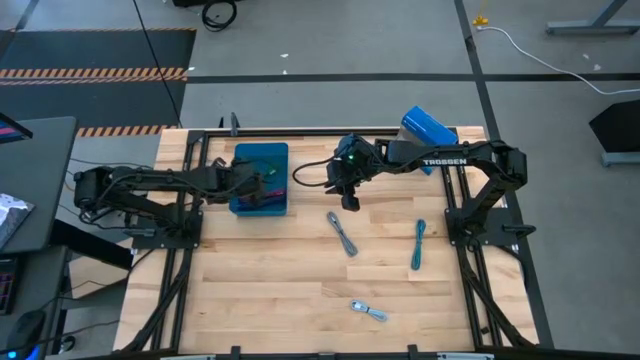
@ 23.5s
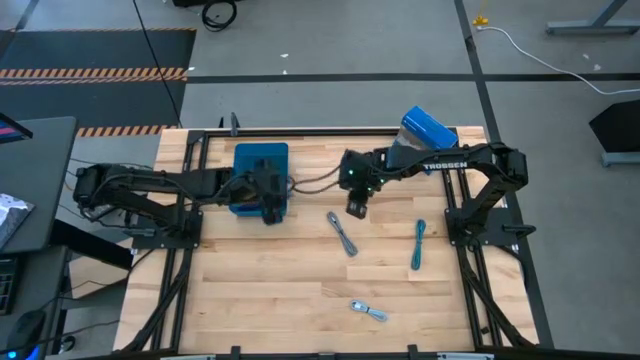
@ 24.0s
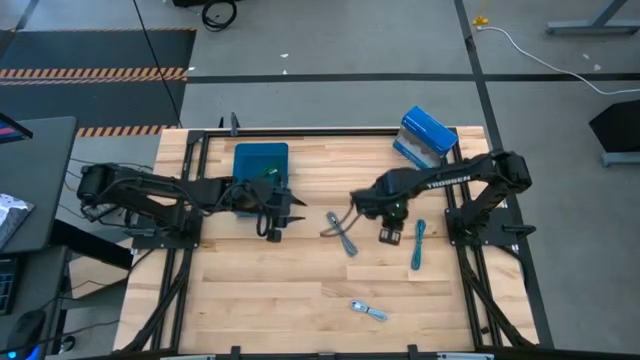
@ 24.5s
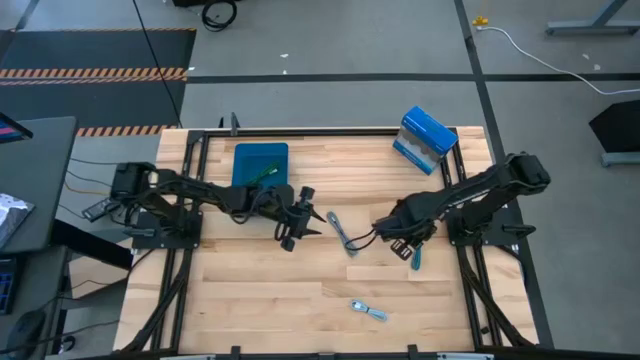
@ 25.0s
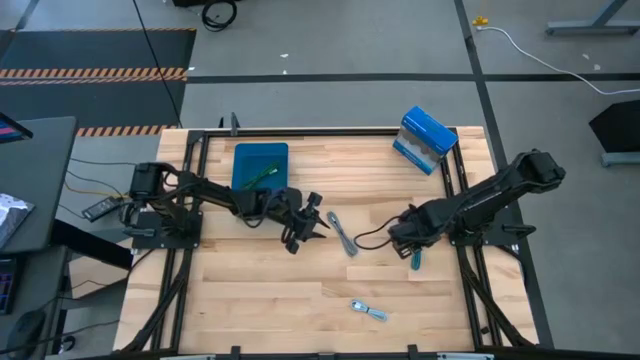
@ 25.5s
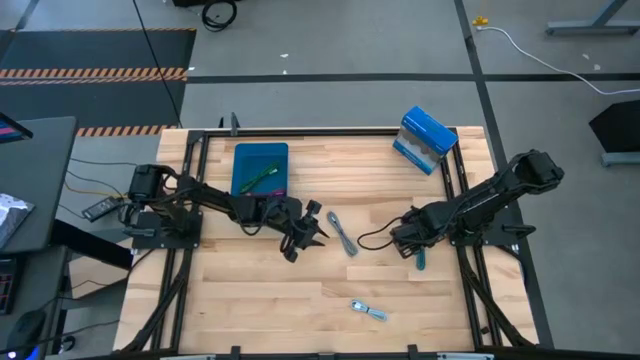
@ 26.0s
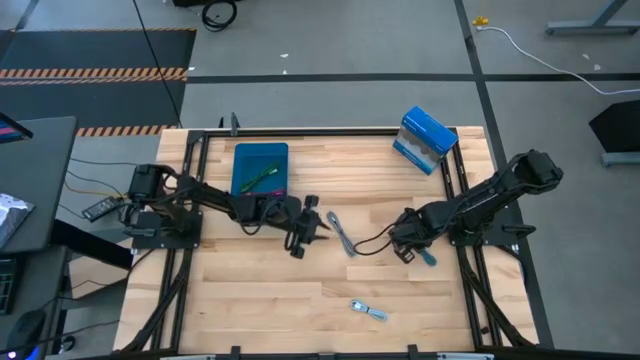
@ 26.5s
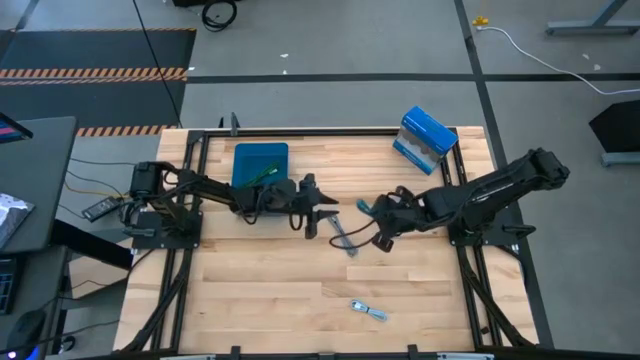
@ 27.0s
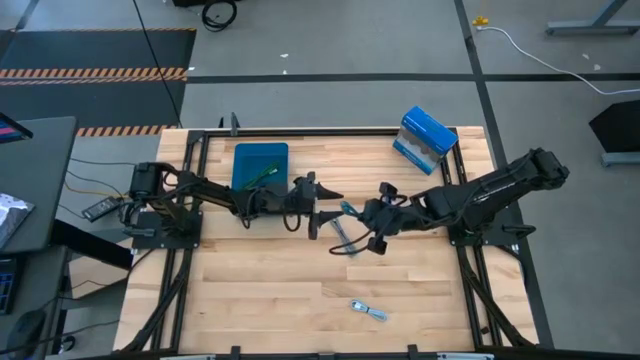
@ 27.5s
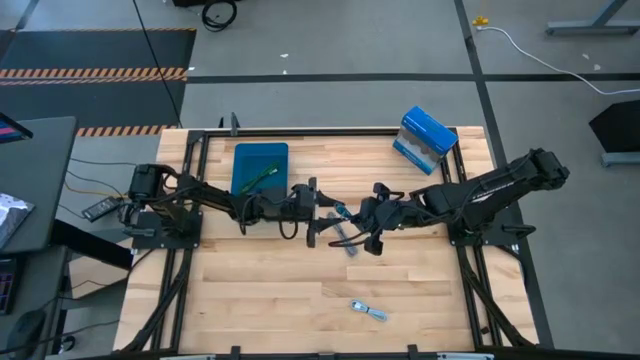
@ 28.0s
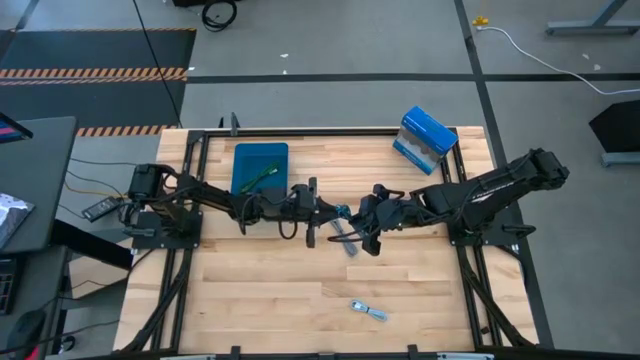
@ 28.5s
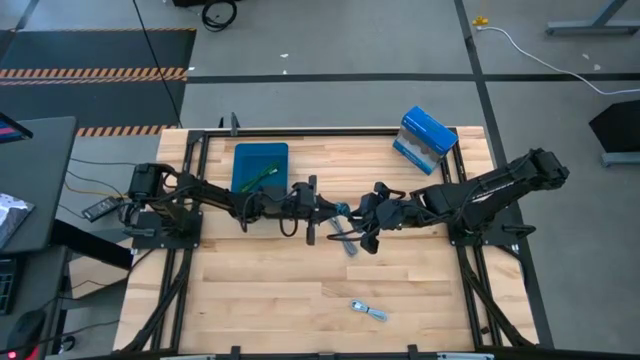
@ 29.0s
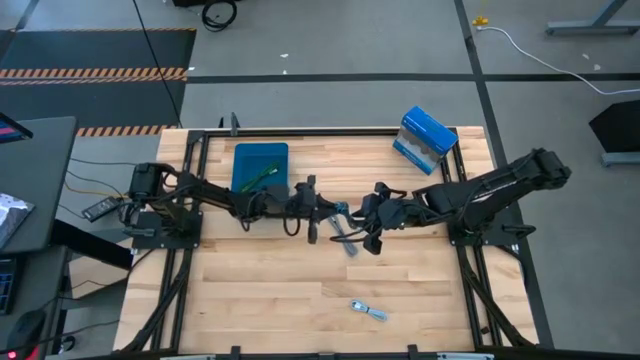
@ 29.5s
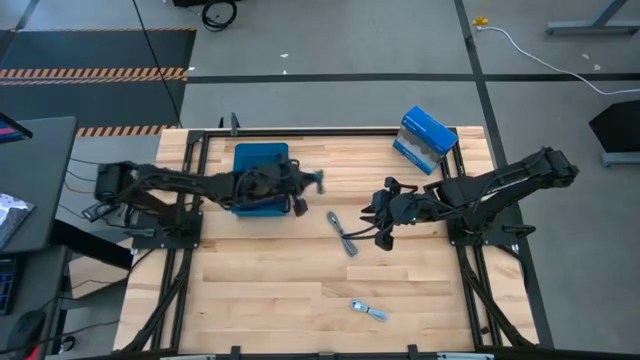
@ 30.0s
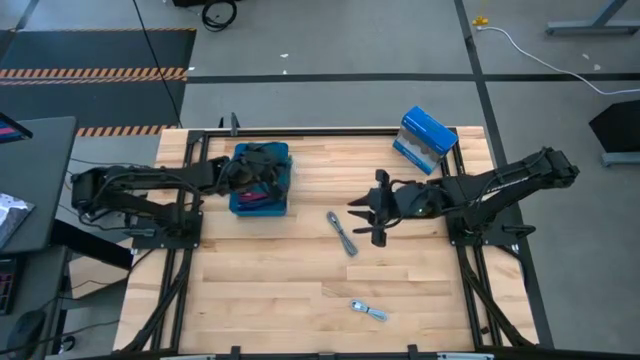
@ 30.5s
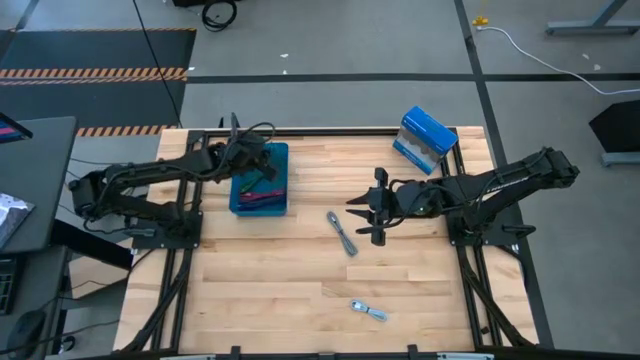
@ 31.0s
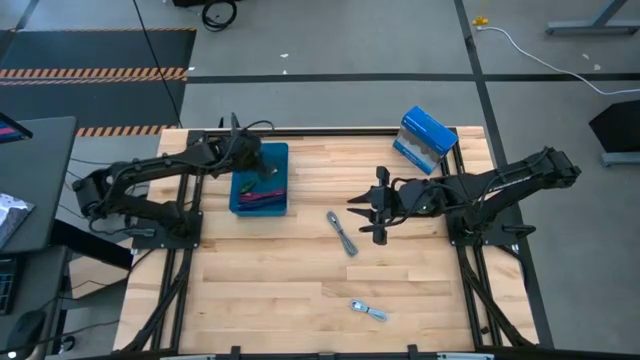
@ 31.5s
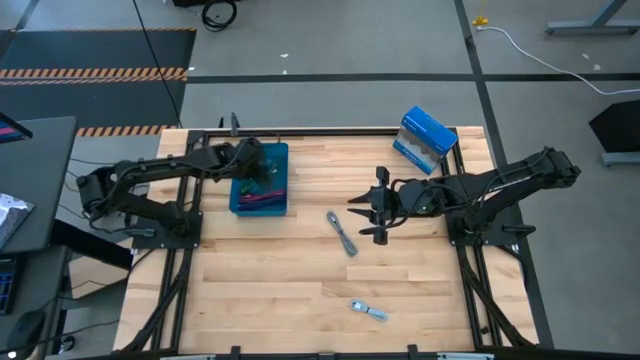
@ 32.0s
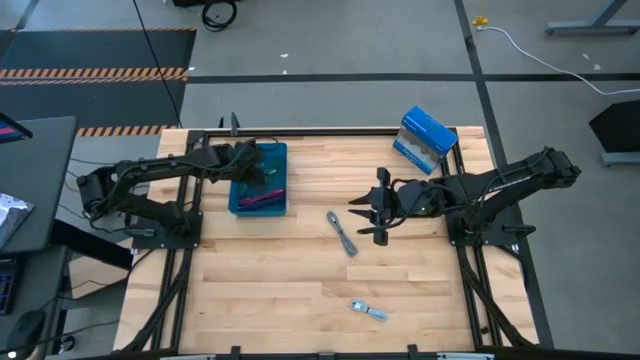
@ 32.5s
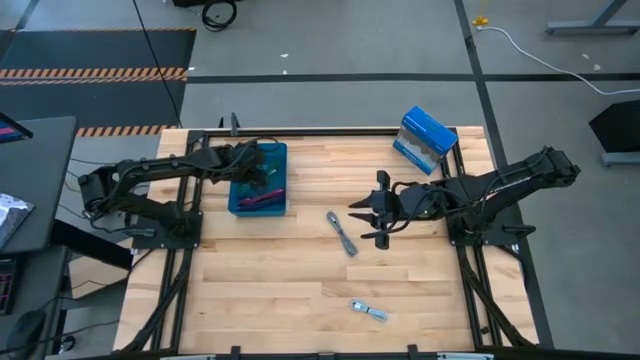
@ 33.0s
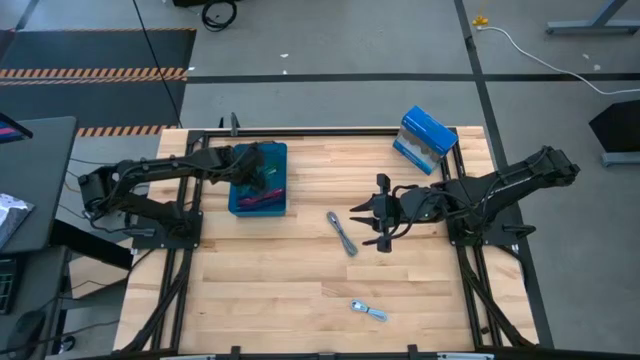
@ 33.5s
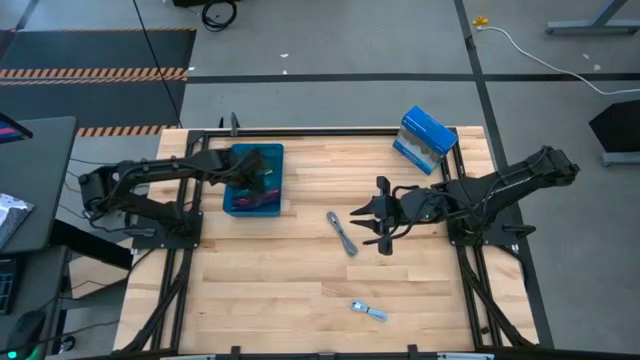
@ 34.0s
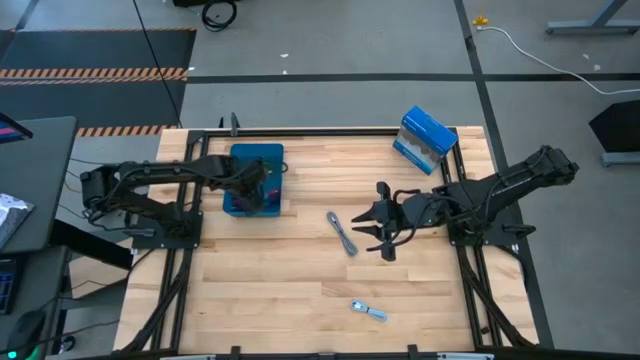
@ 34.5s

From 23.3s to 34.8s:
Task: Pick and place USB-C Cables
Put the black blue charger cable into the blue bin

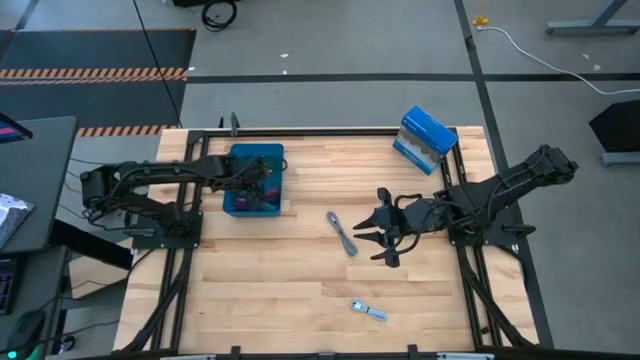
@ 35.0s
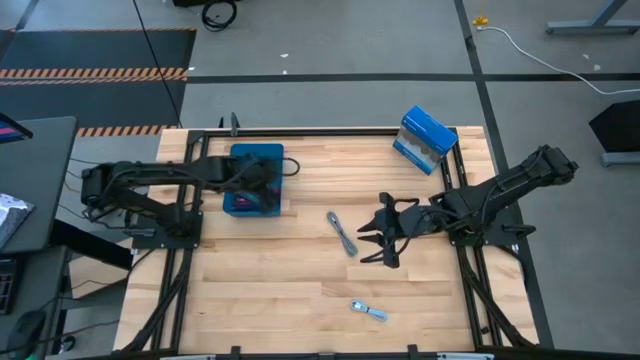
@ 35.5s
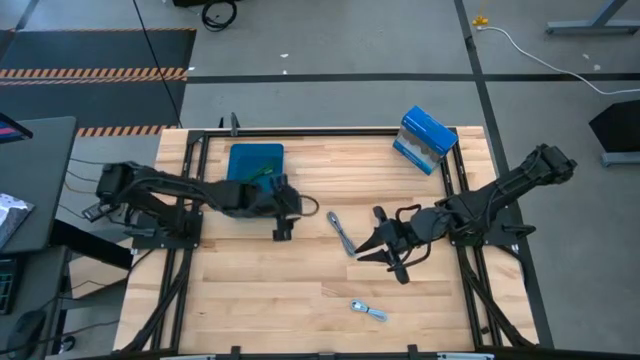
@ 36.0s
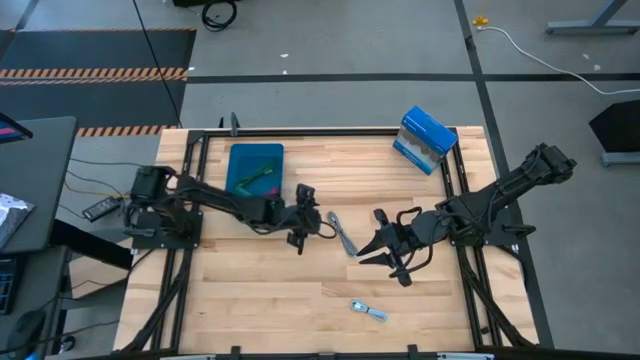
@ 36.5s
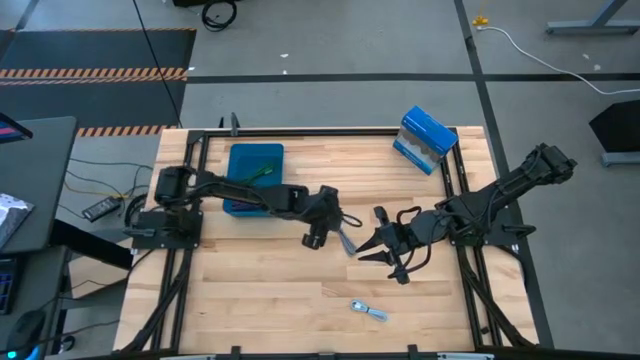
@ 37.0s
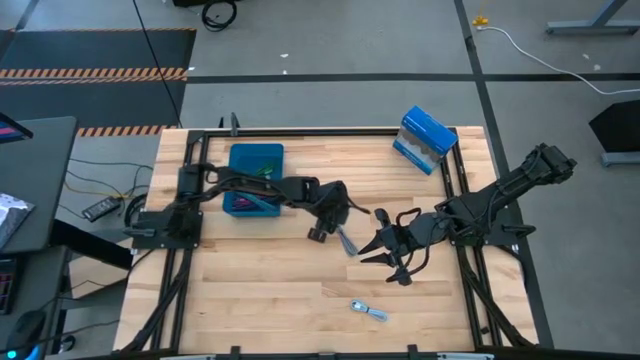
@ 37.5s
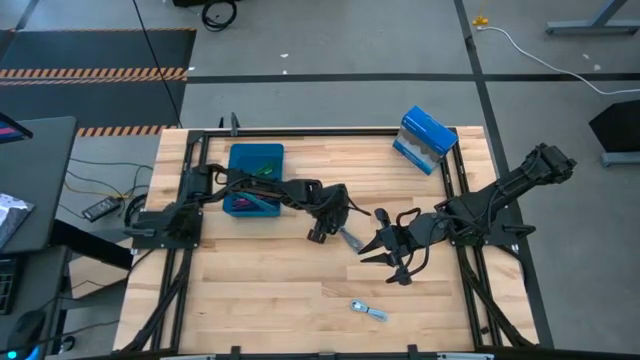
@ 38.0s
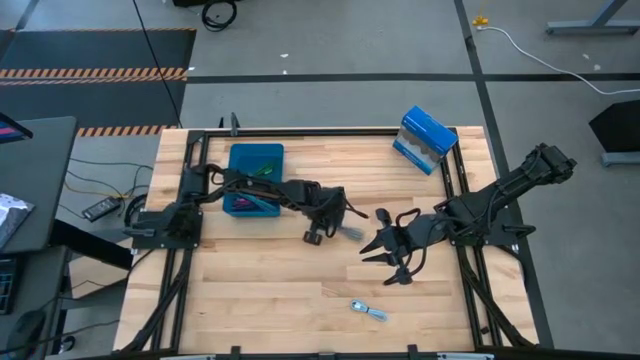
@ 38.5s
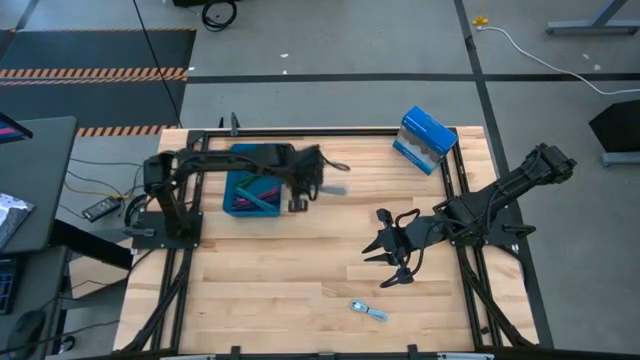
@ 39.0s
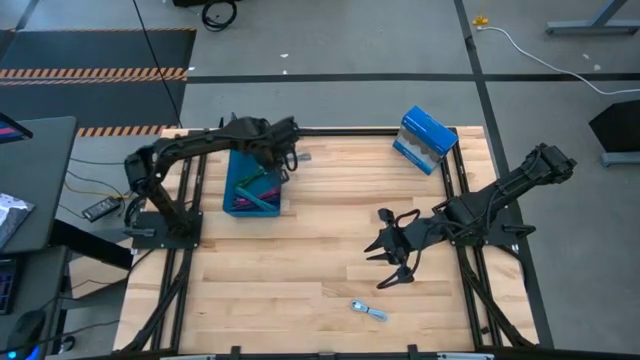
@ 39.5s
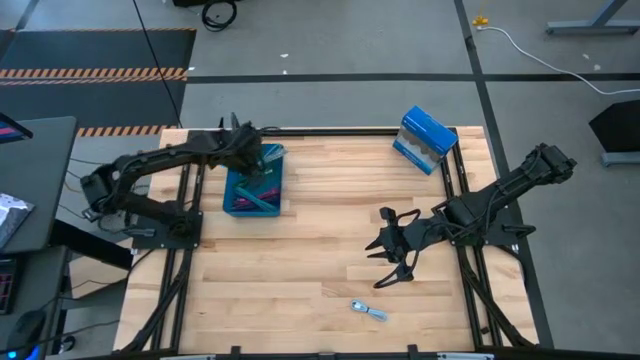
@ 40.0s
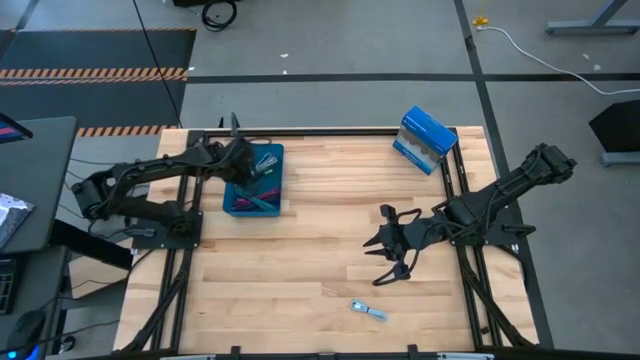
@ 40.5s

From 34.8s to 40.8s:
Put the black white charger cable into the blue bin

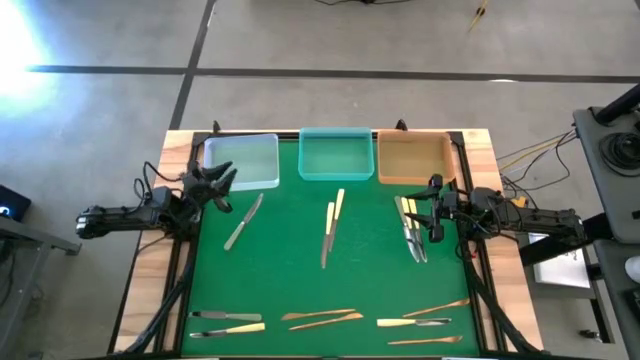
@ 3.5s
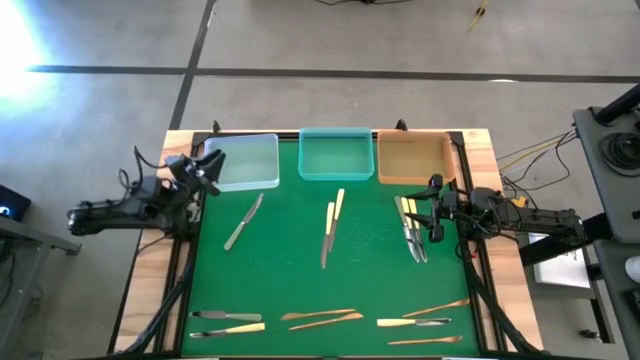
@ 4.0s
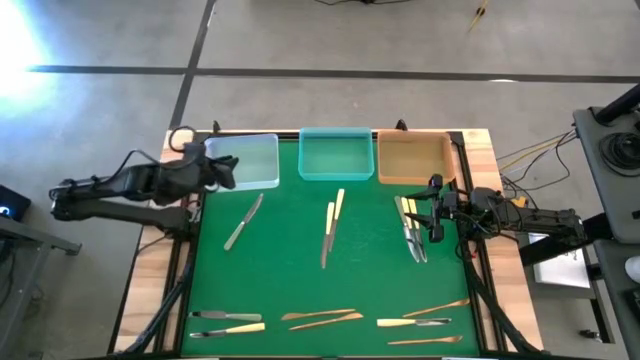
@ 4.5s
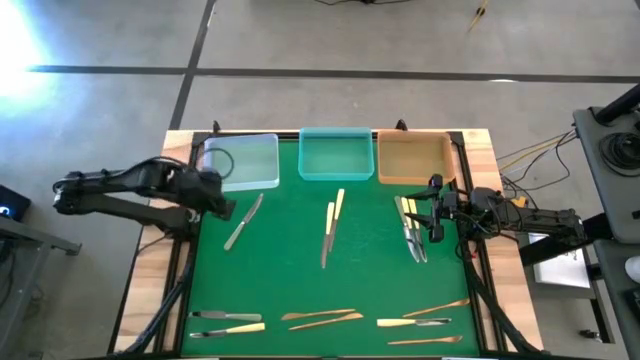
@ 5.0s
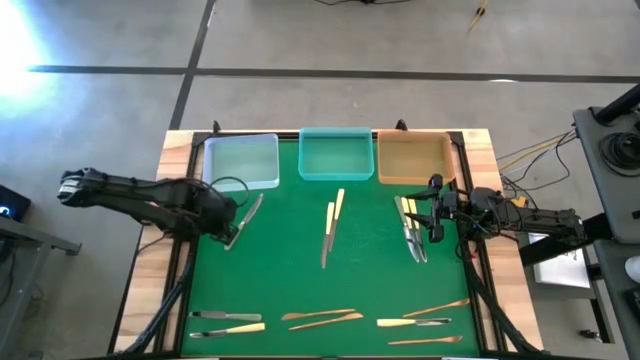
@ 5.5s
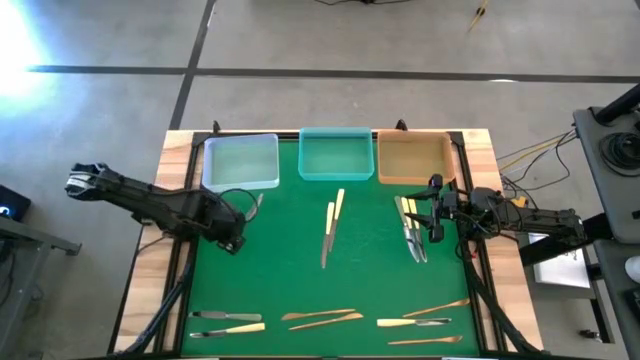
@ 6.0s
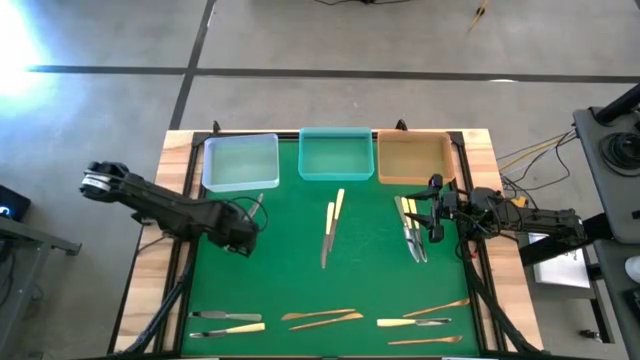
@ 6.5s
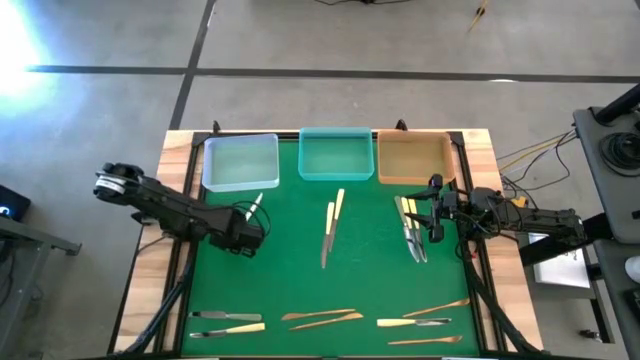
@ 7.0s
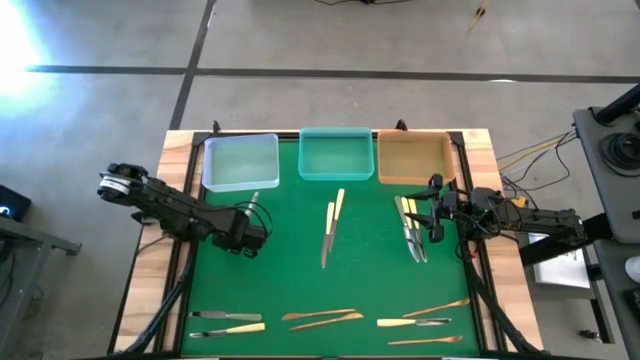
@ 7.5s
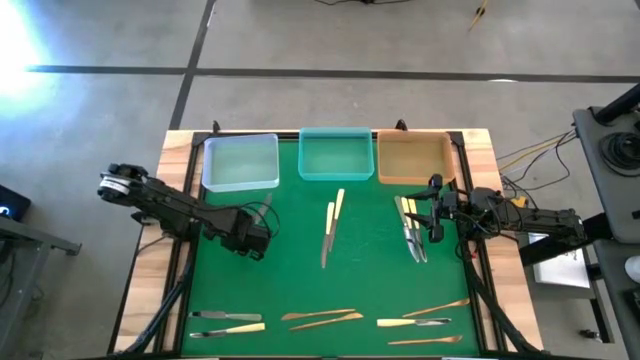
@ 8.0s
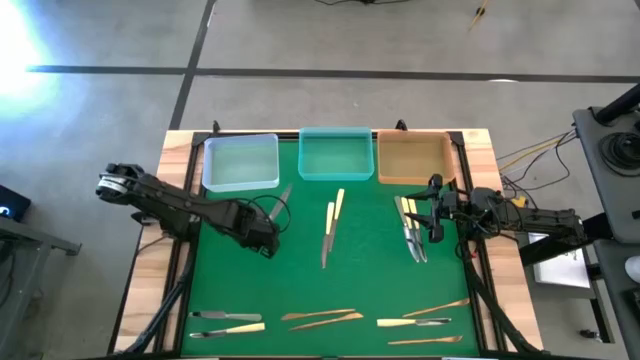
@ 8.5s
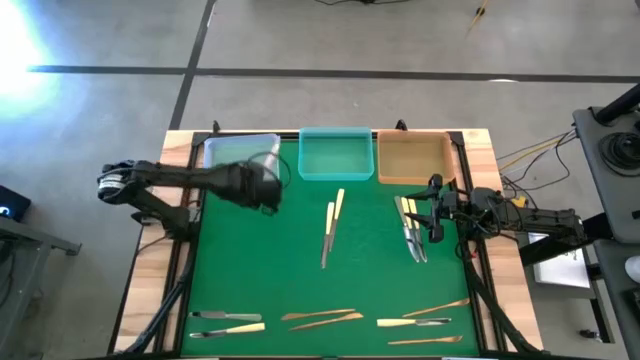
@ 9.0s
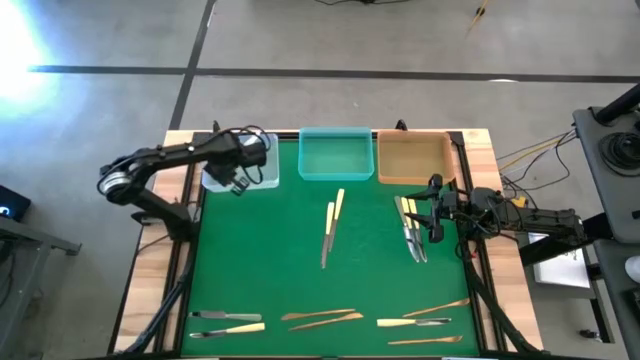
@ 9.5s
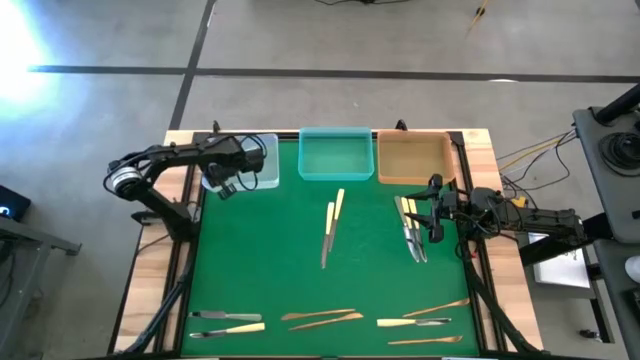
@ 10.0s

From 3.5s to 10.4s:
Task: Sort silverware by color (type)
Put the top left silver knife into the transparent bin
